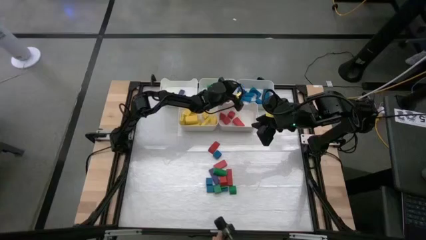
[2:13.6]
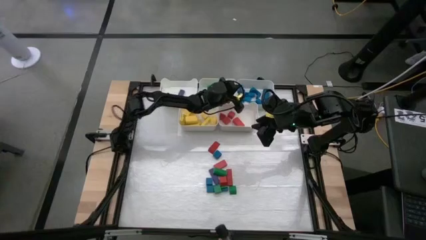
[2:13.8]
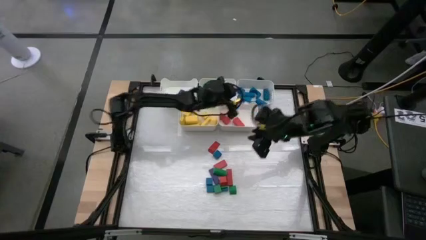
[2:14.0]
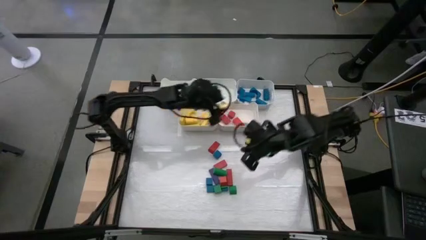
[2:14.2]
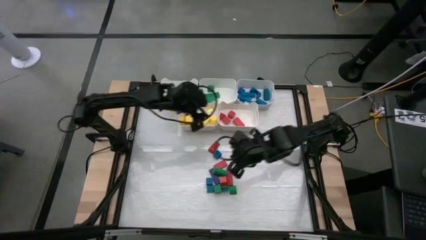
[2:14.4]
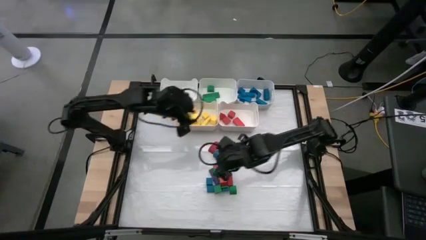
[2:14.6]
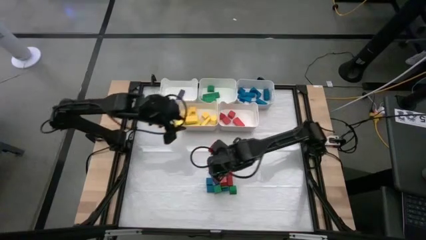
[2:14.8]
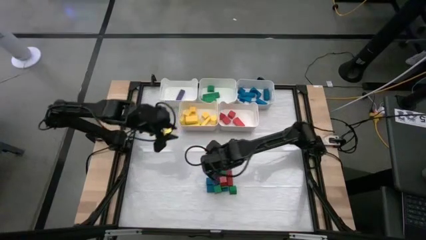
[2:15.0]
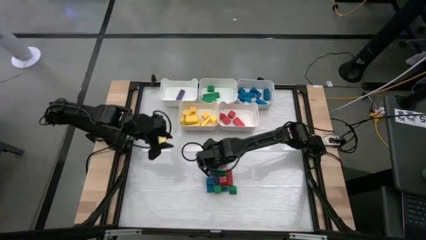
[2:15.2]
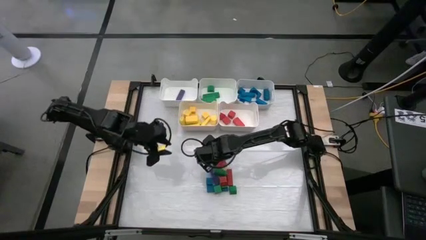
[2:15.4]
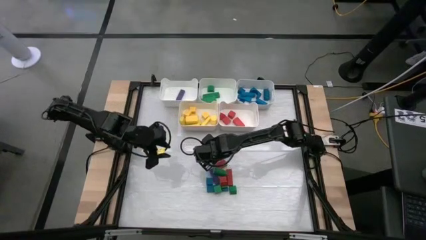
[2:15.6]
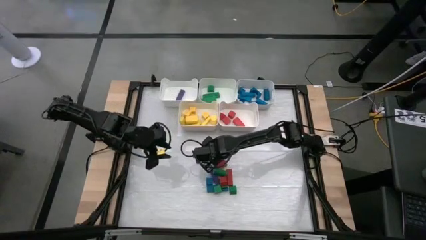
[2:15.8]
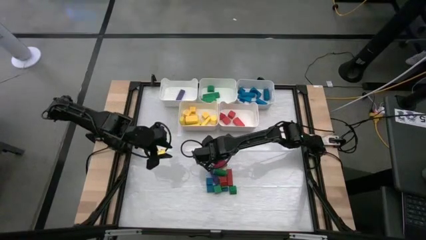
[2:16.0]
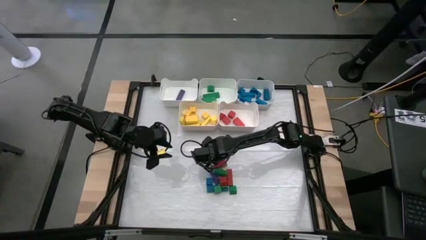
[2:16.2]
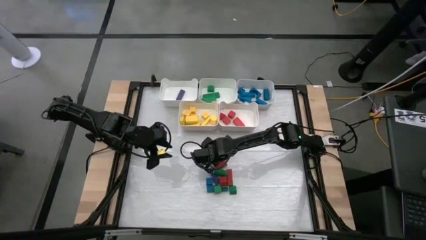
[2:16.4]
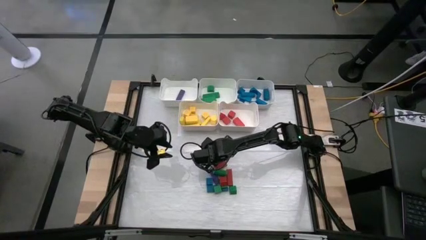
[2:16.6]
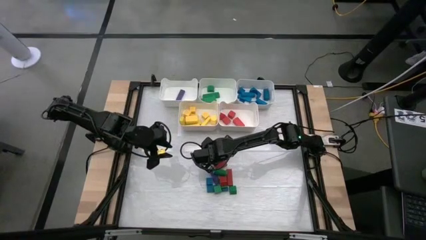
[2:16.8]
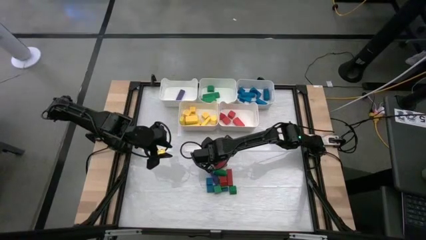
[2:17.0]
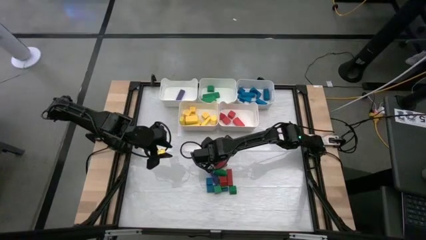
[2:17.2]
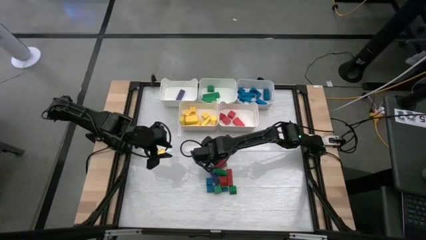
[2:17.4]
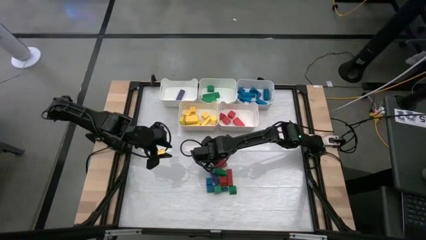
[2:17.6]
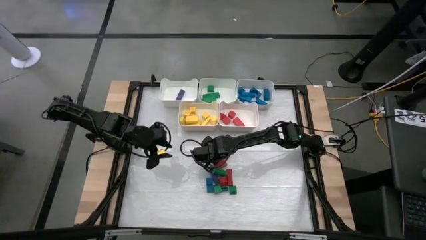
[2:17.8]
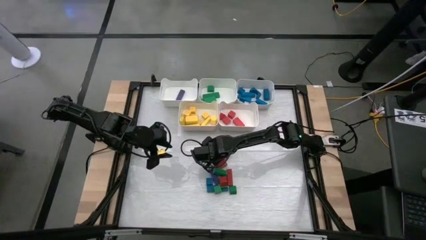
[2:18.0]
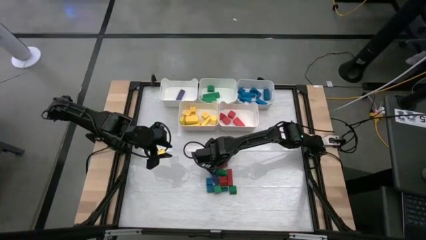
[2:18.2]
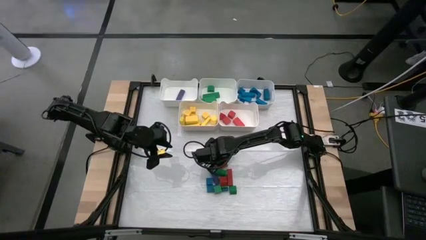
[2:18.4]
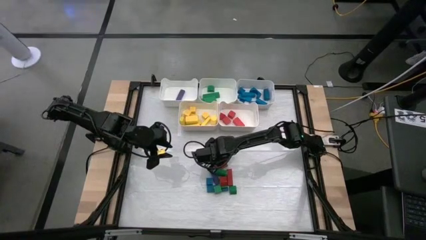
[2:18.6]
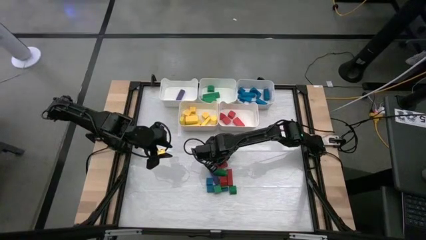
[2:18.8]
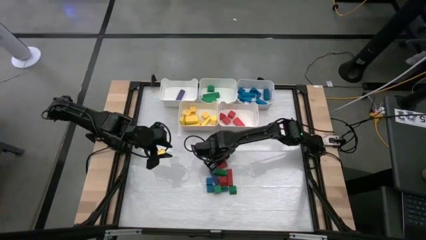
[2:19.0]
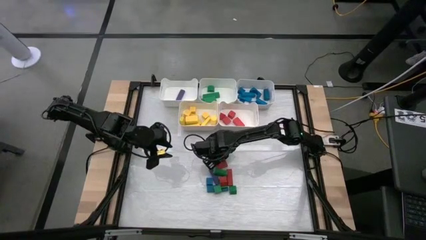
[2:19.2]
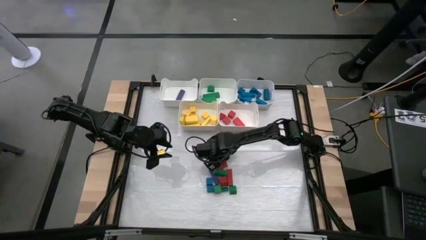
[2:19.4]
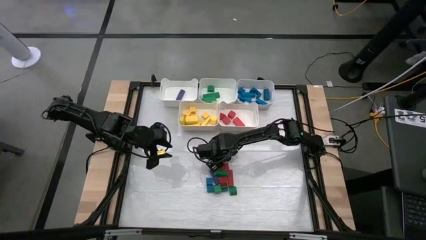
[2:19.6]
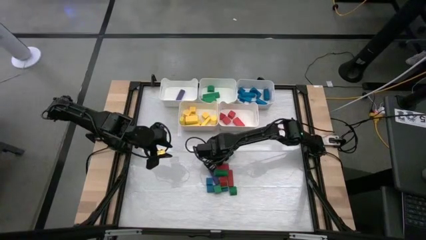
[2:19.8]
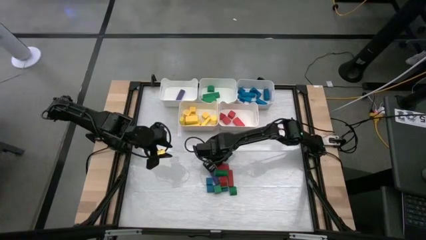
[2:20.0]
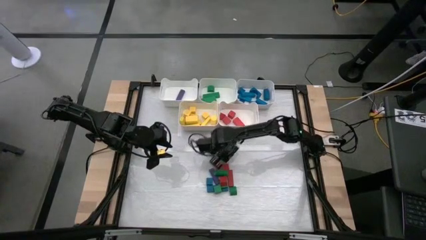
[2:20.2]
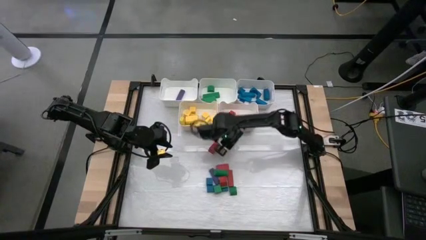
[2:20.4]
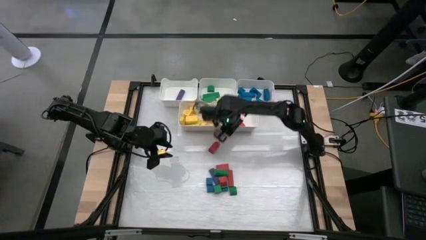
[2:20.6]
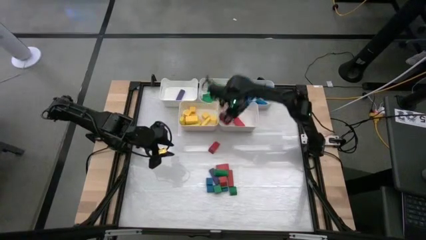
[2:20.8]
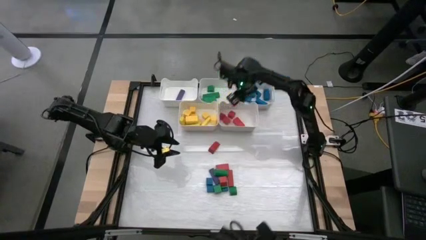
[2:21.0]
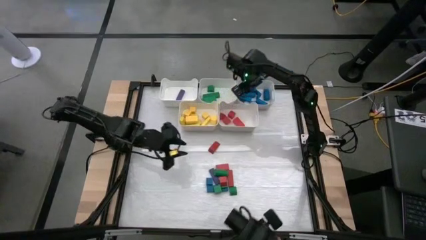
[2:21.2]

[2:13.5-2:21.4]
Task: Sort blocks
Put the blue block into the top right bin

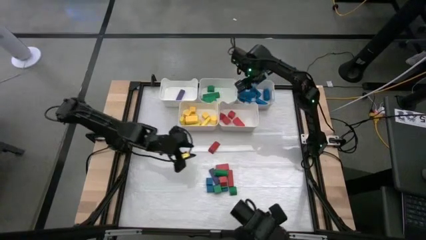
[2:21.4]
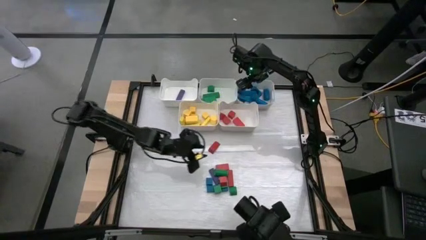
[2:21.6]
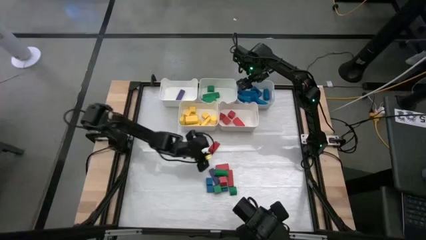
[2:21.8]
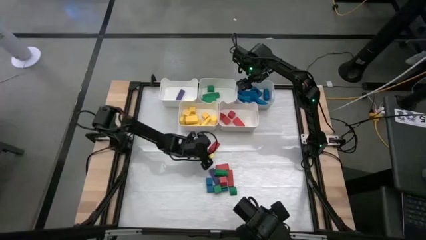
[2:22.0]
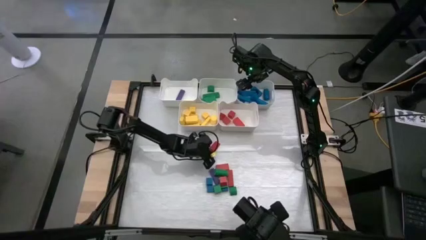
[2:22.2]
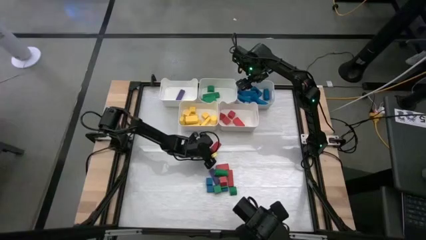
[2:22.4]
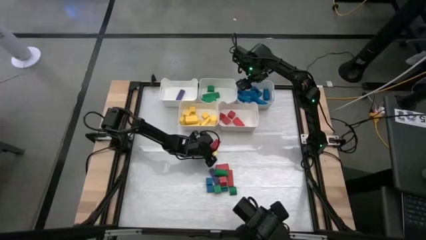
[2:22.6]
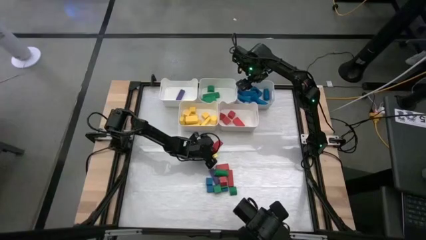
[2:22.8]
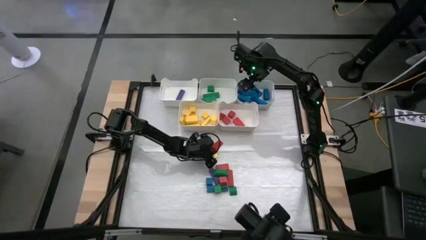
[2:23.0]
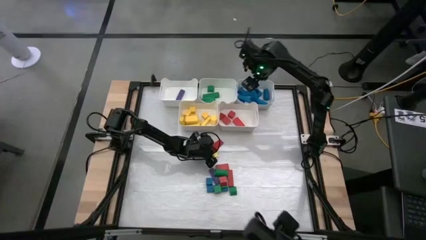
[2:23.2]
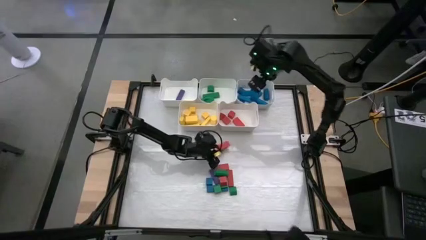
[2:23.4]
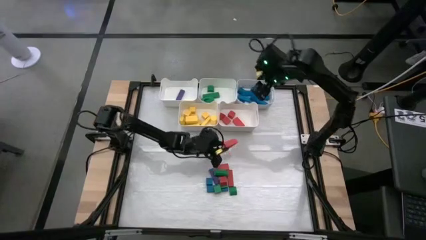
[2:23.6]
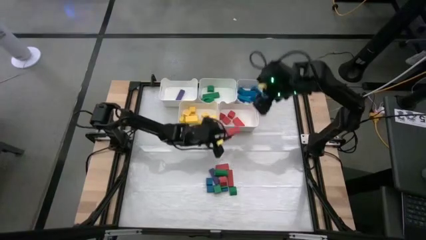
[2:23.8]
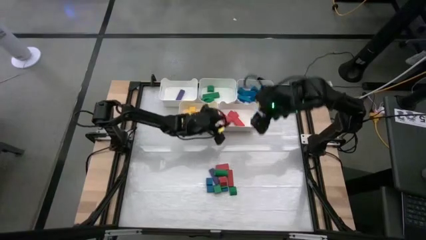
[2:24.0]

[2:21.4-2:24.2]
Put the red block into the bottom right bin

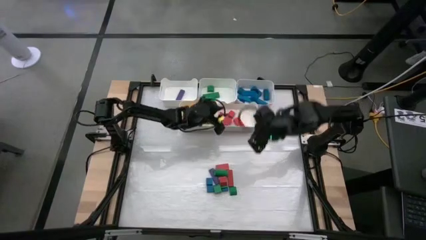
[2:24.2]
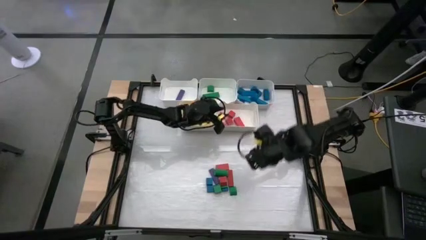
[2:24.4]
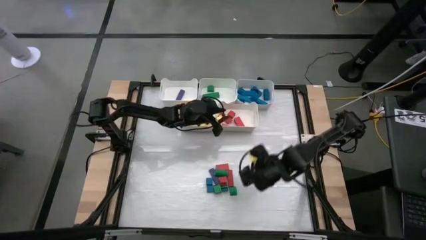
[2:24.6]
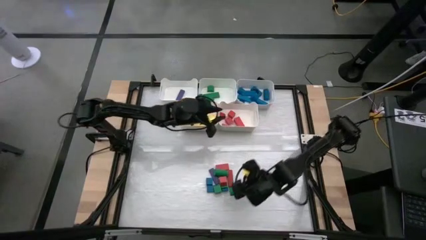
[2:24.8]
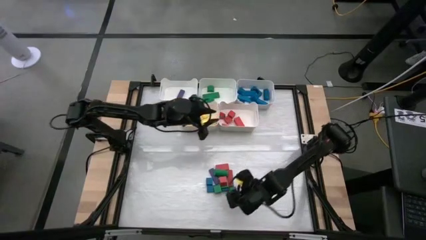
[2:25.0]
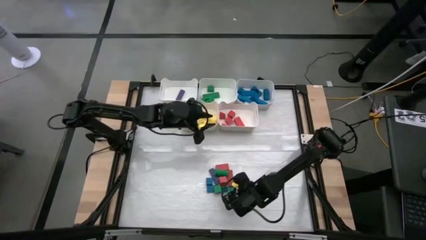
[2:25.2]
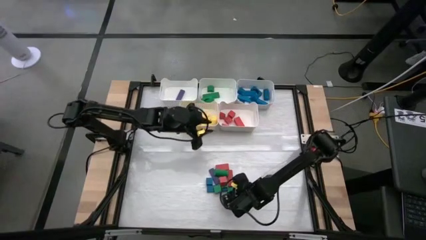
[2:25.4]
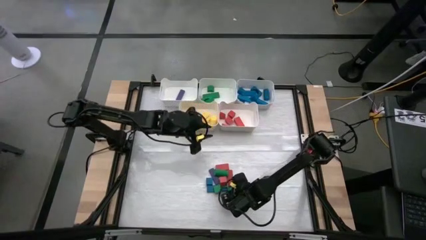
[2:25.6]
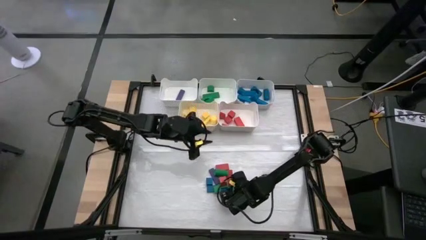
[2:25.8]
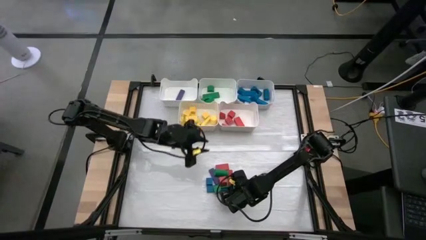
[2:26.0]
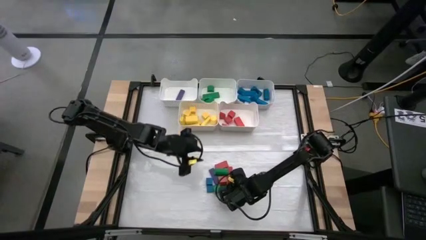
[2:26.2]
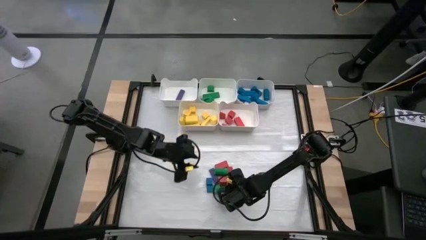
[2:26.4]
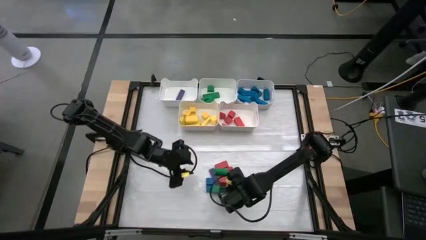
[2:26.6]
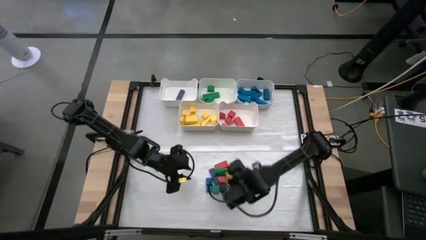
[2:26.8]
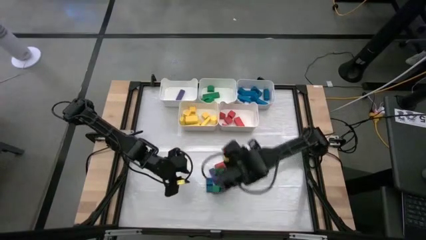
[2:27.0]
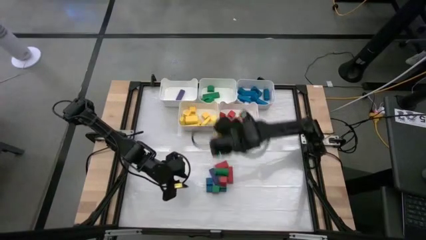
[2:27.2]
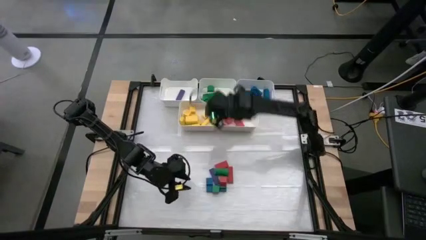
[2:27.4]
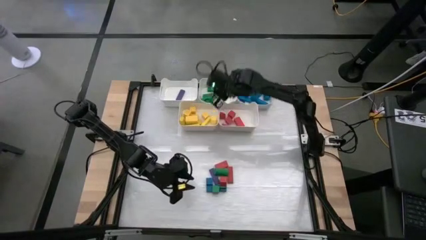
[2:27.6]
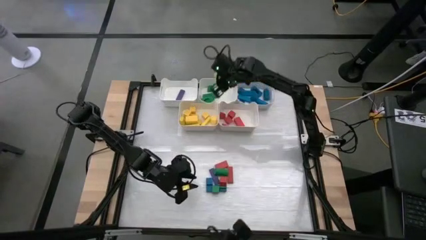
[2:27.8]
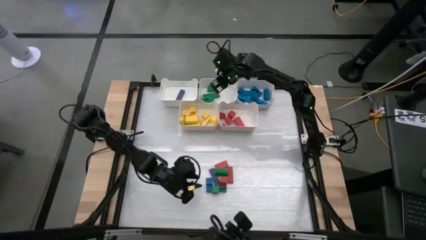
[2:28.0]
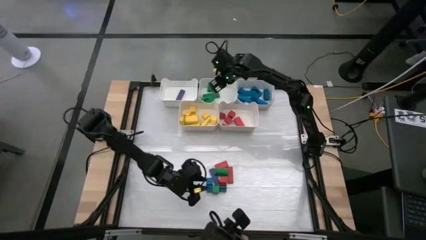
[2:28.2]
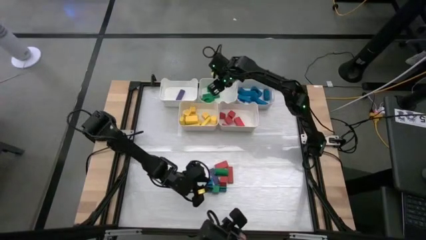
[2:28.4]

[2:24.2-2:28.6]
Put the green block into the top center bin
